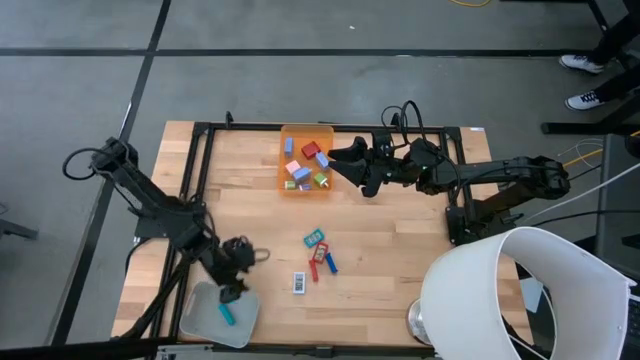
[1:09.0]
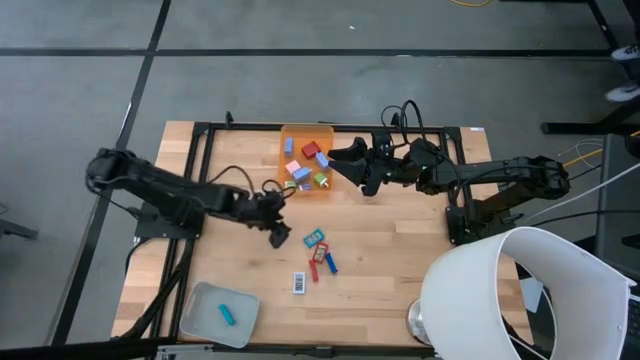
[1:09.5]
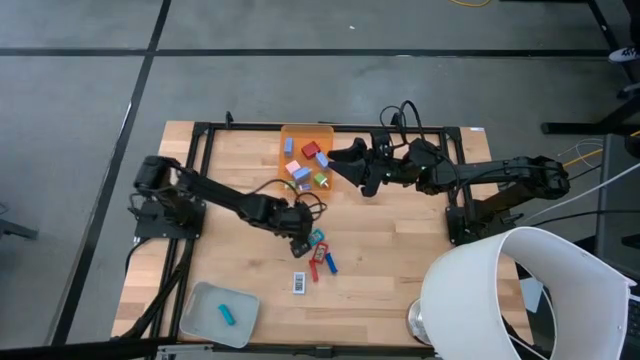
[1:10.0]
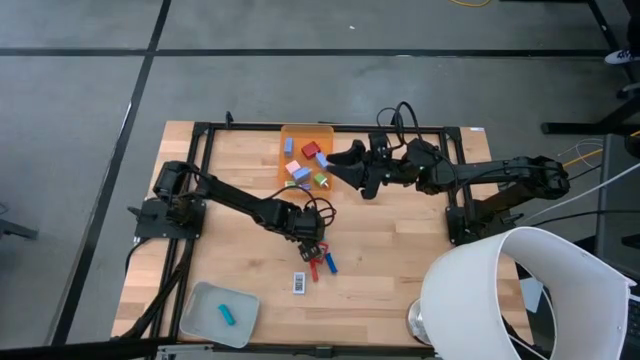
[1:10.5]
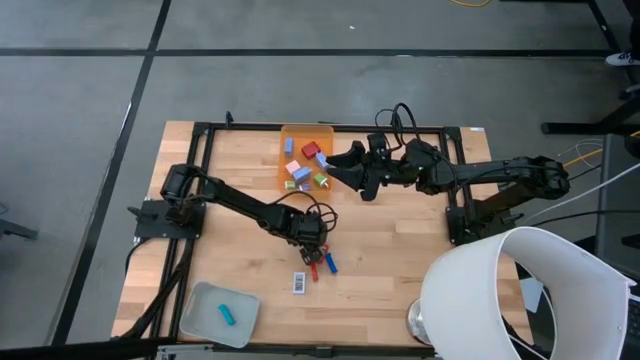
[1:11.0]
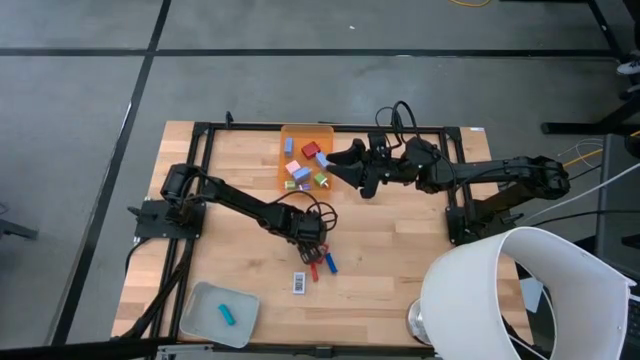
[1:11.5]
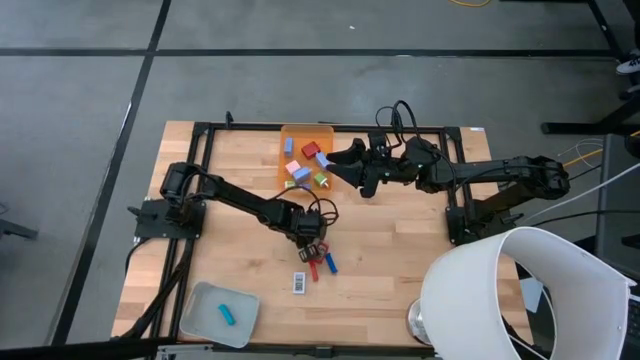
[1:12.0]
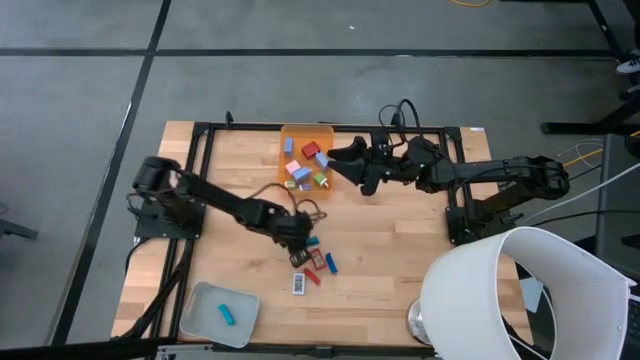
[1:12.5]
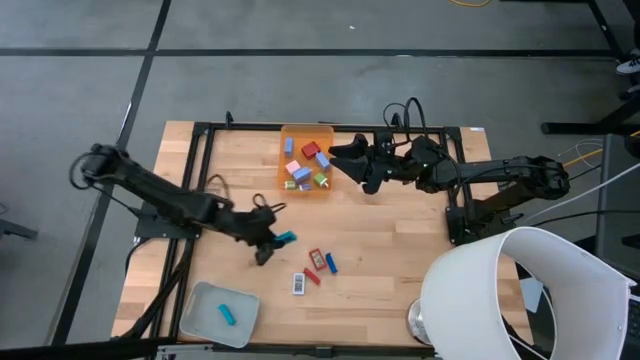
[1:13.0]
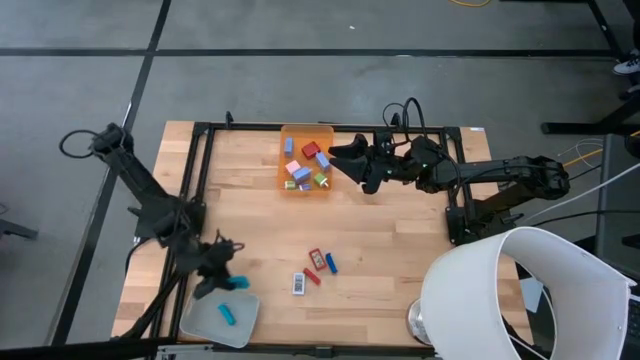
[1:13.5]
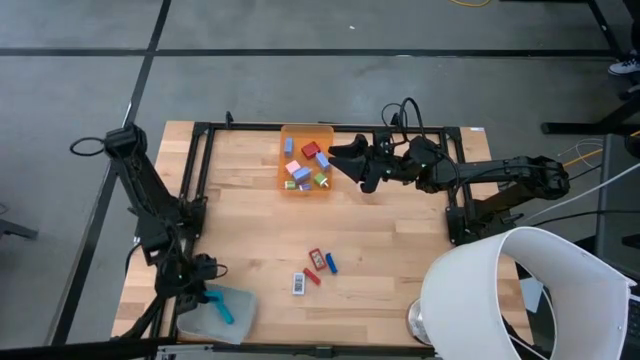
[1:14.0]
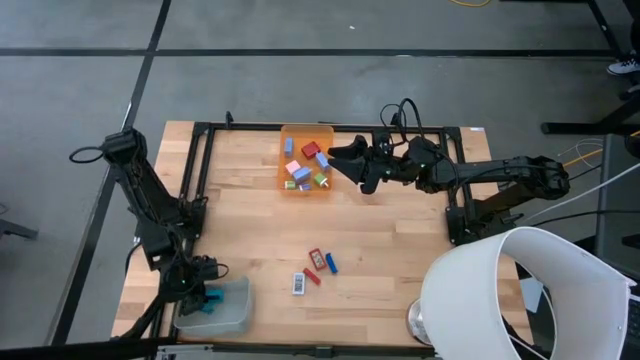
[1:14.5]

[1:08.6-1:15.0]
Task: Pick & Place Office items
Put the light blue digital clock into the gray bin

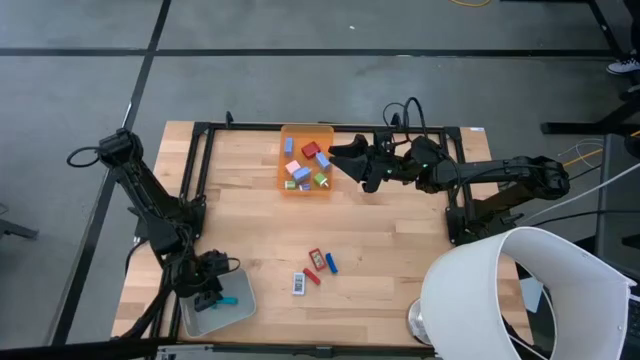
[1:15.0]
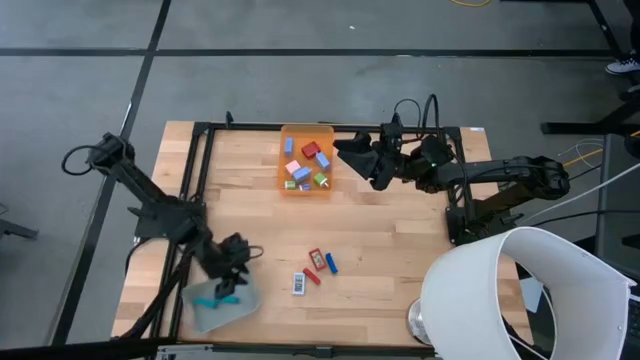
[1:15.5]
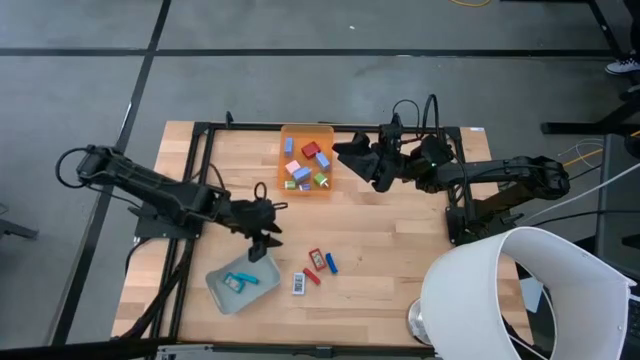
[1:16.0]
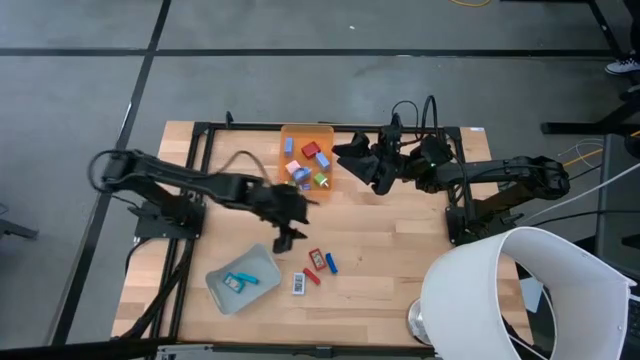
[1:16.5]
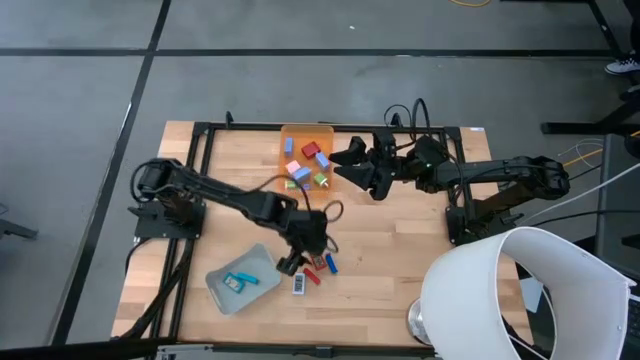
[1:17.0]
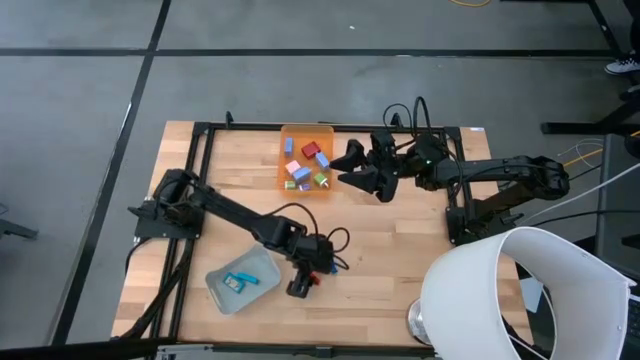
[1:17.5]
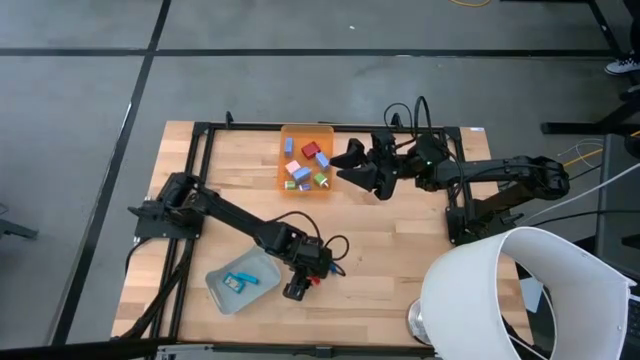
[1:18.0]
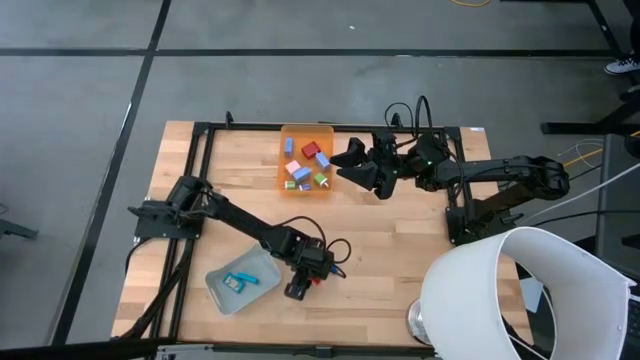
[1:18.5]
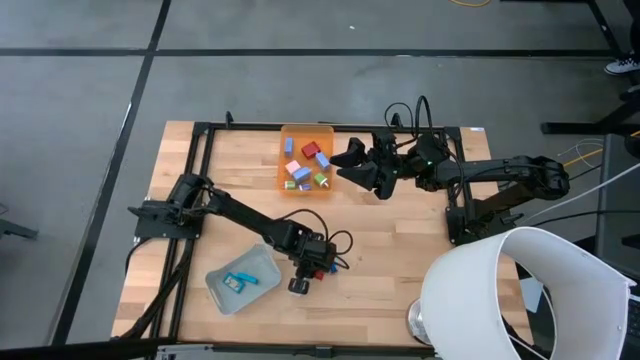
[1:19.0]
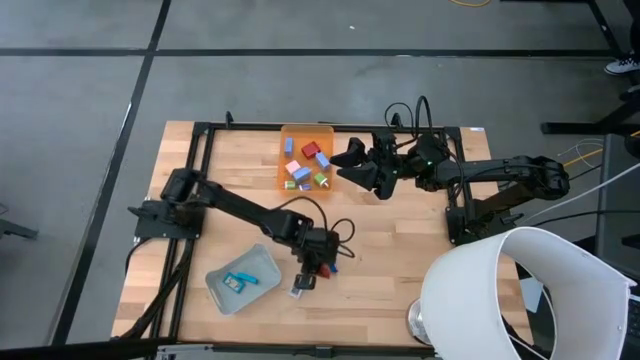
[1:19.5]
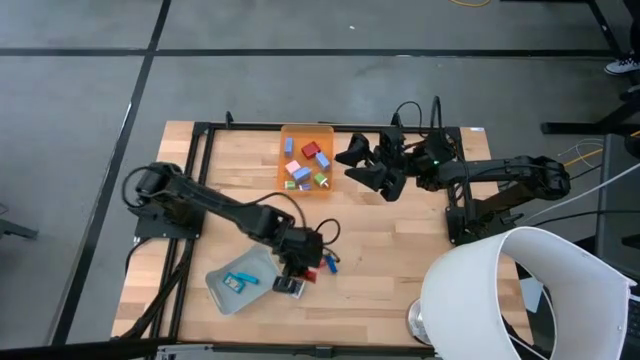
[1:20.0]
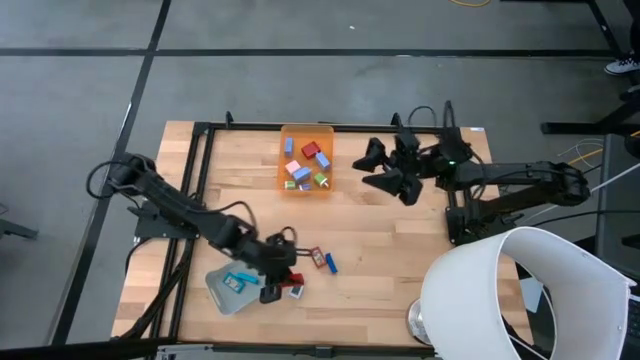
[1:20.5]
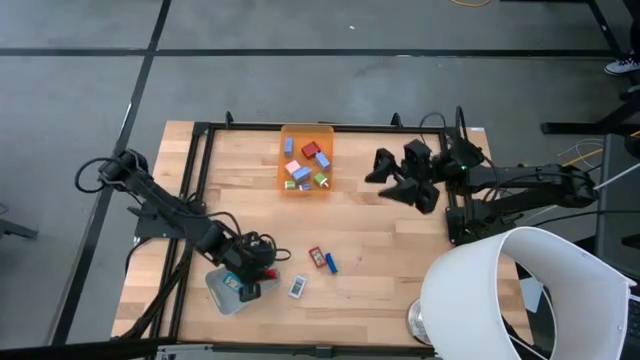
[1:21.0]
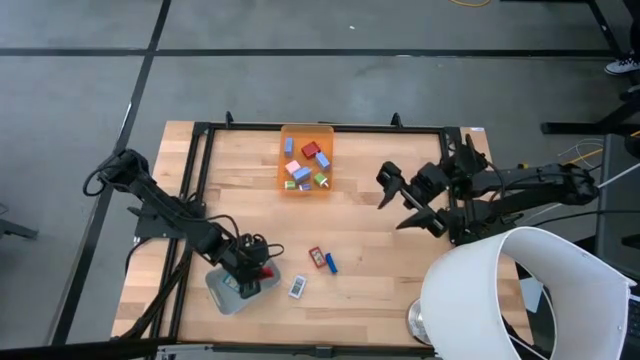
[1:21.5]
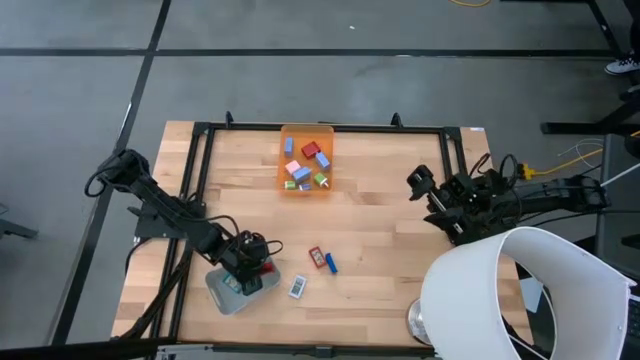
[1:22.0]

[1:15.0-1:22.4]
Put the bottom red digital clock into the gray bin

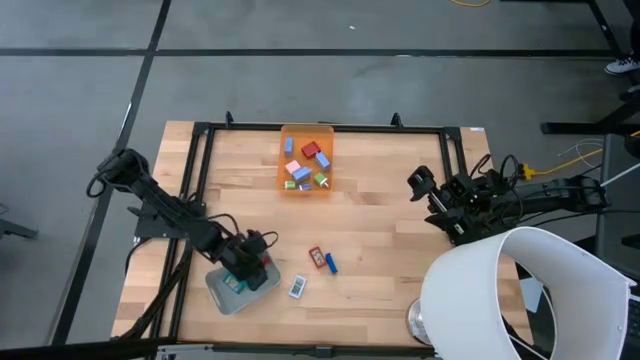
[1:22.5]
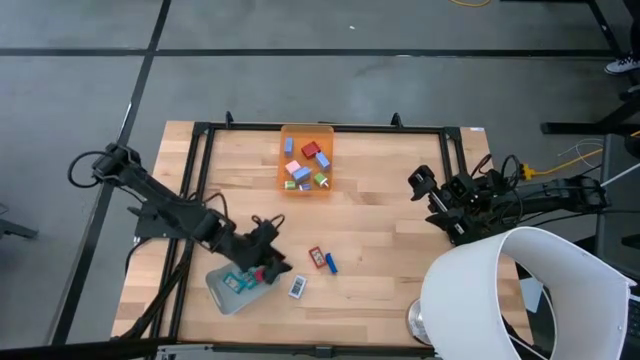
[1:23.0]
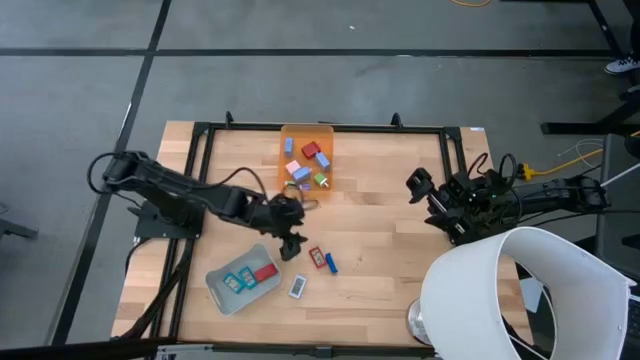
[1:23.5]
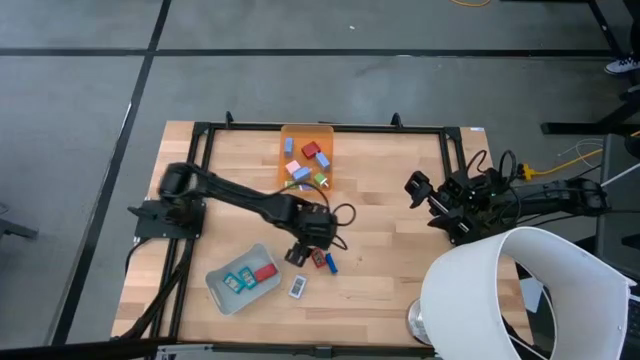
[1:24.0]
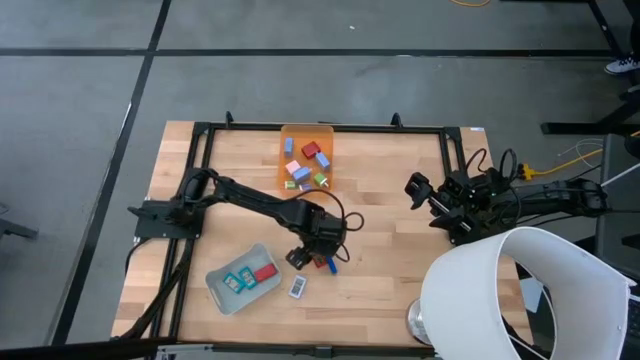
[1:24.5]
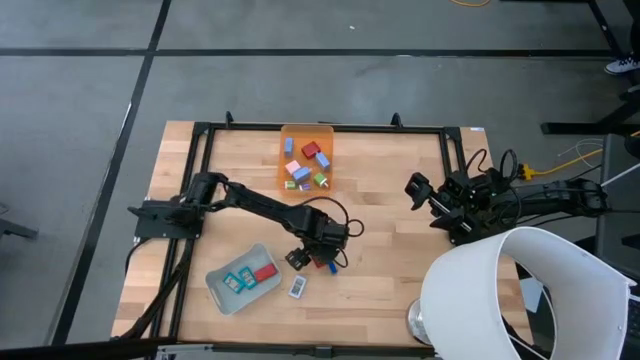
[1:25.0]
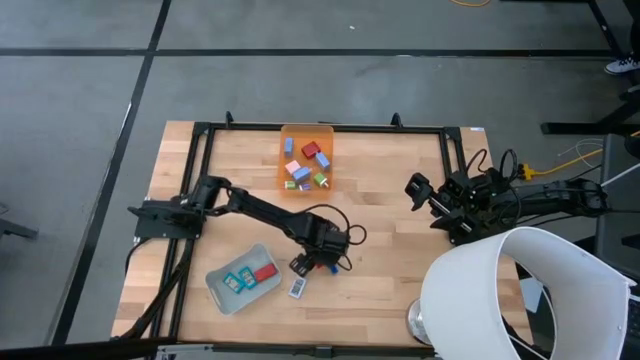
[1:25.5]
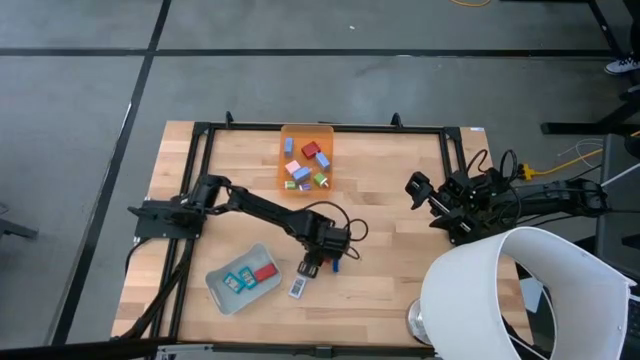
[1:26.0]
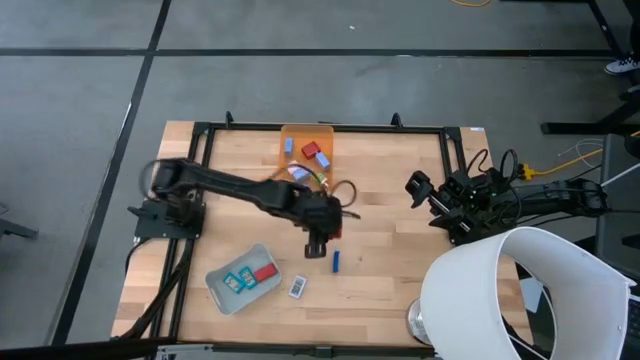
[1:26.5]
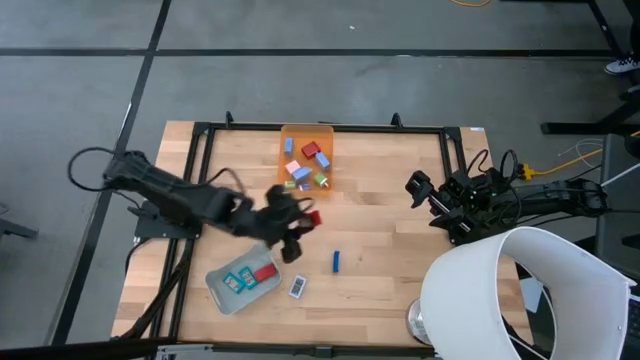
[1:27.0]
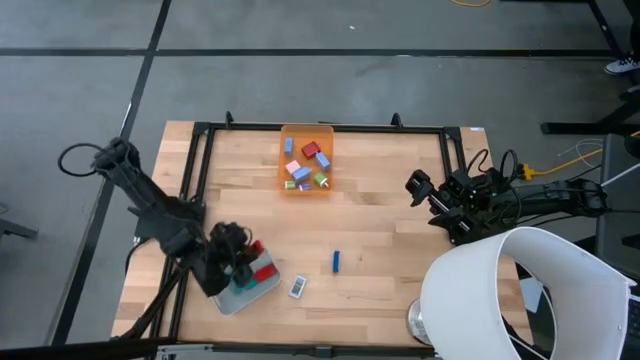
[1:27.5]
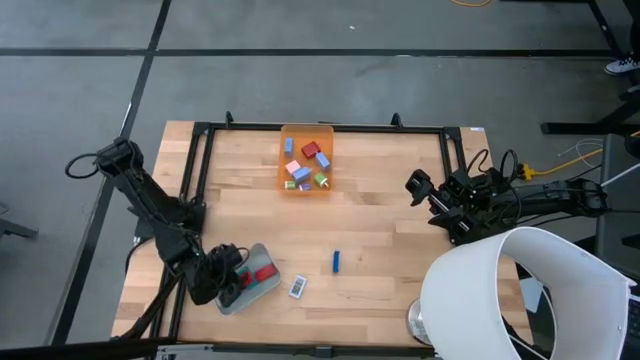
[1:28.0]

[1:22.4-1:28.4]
Put the red digital clock into the gray bin

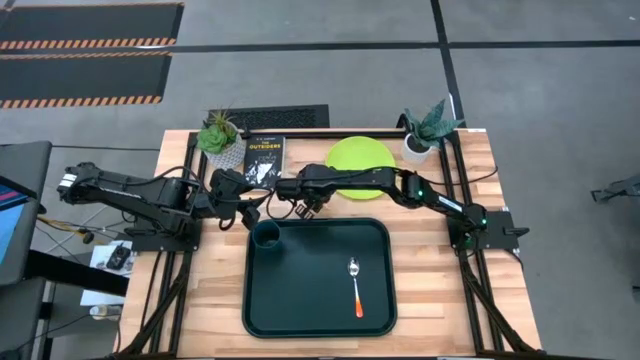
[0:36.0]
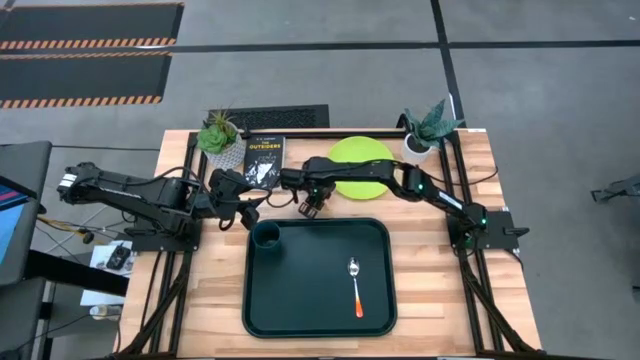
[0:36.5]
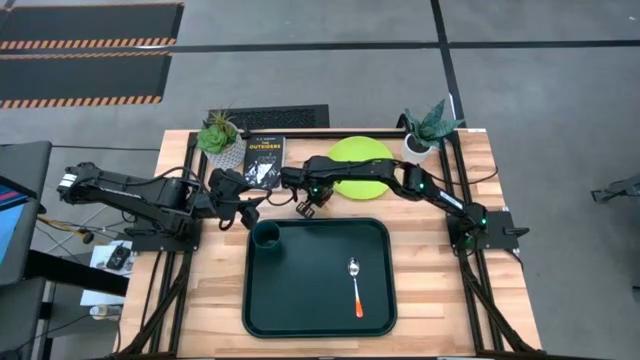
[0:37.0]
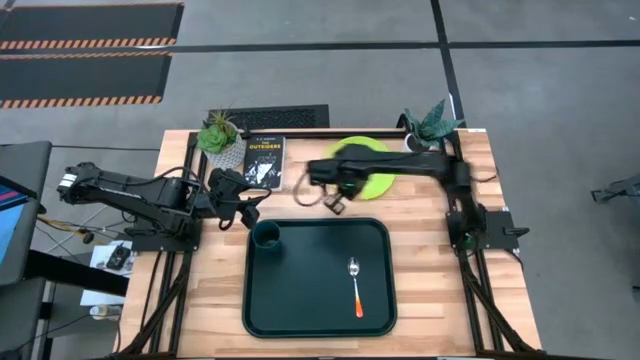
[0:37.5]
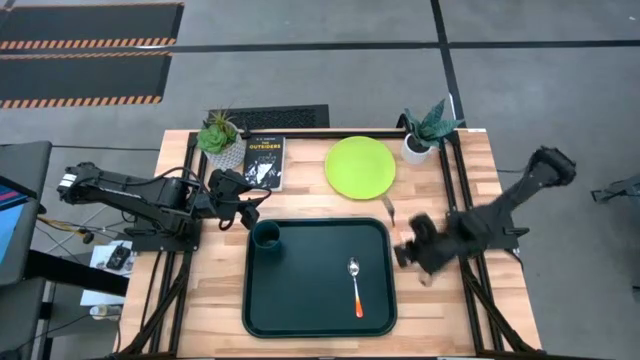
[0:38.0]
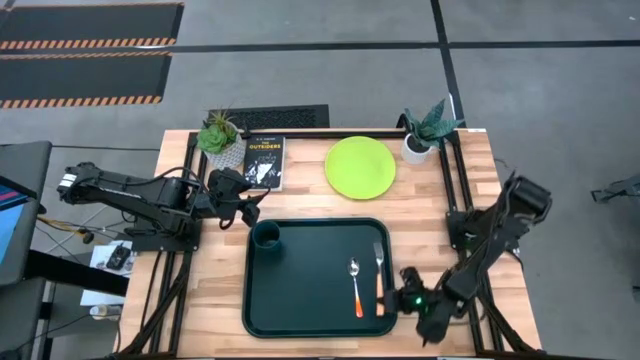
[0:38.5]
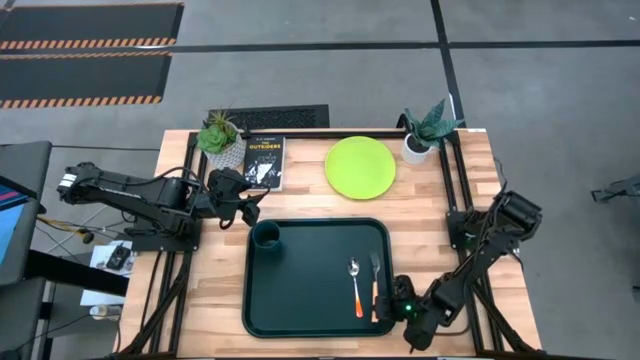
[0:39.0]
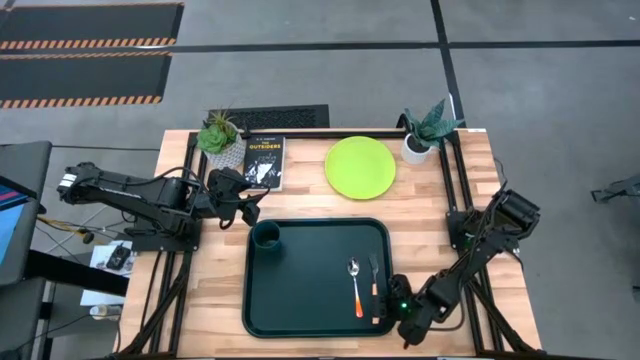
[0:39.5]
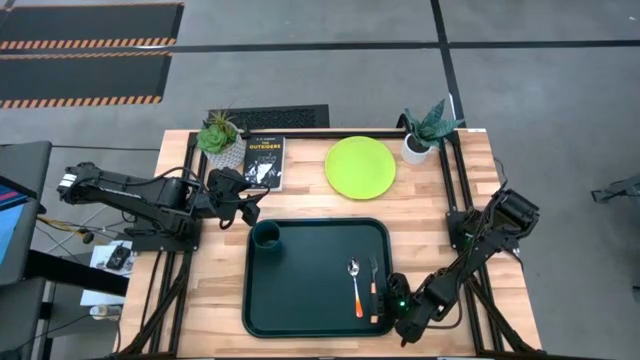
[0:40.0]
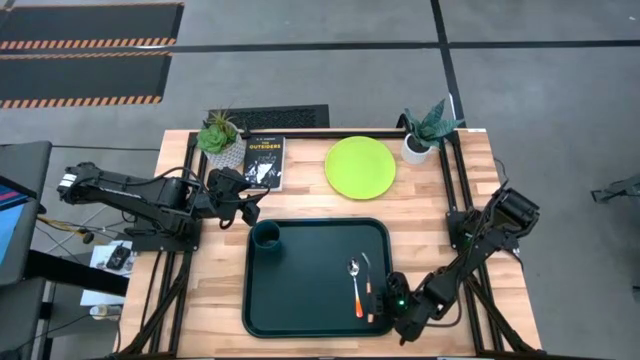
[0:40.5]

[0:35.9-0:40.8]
Task: Pick and place plate/cup/fork/spoon on tray
Put the fork onto the black tray
